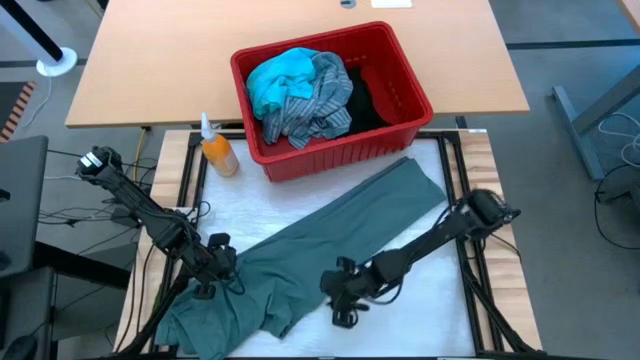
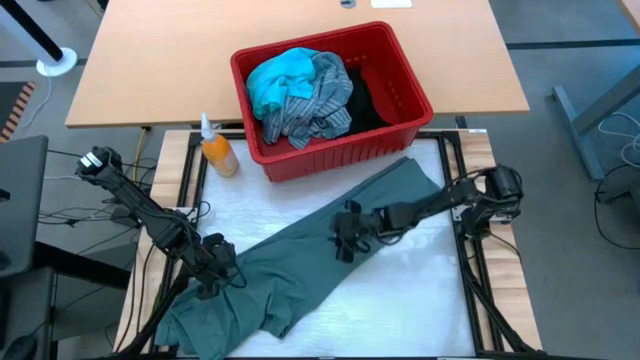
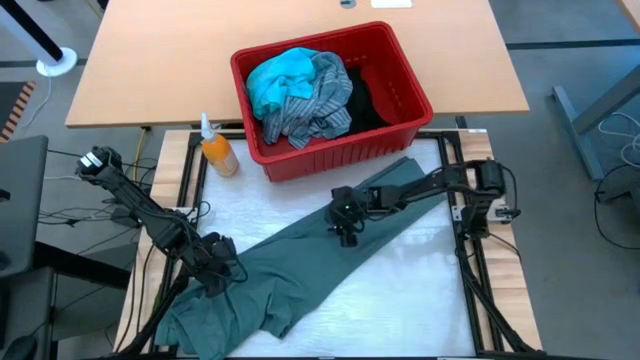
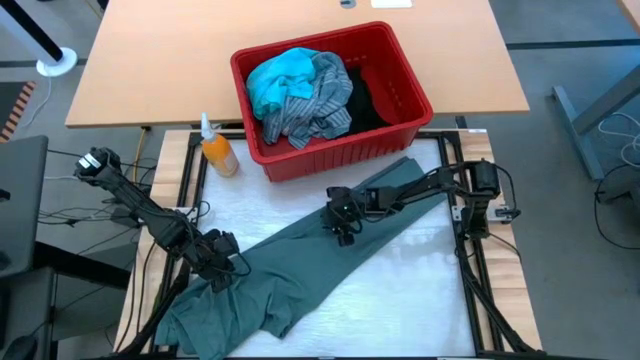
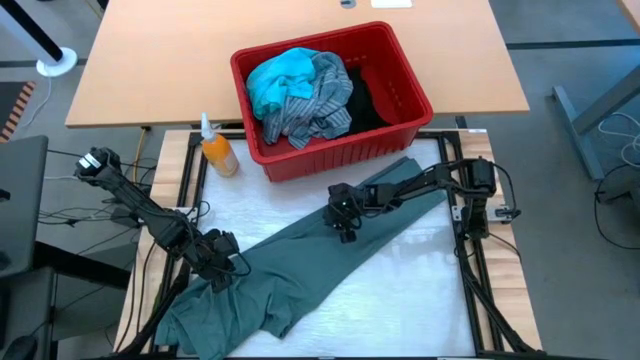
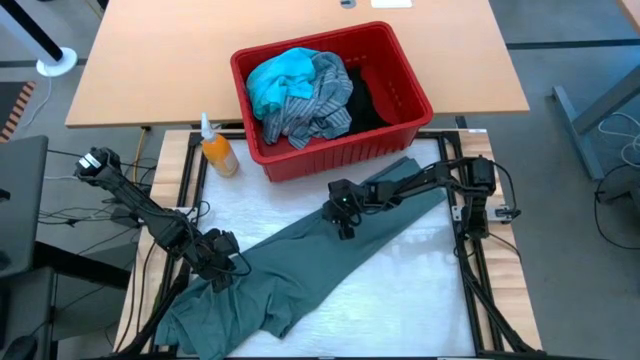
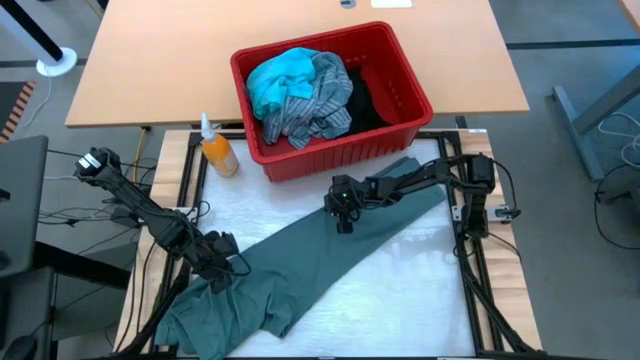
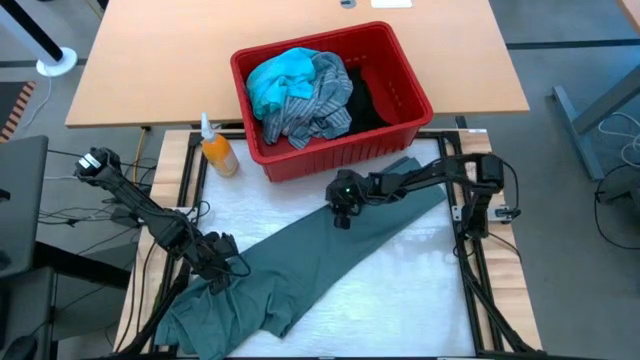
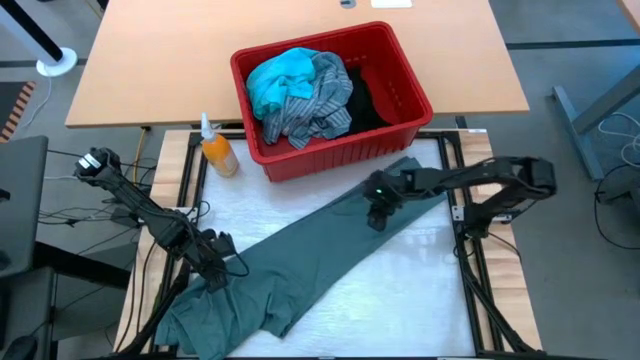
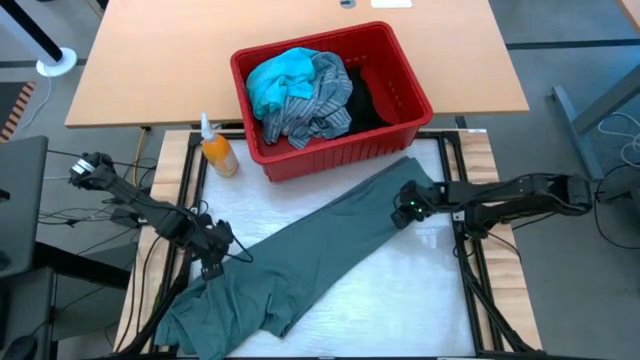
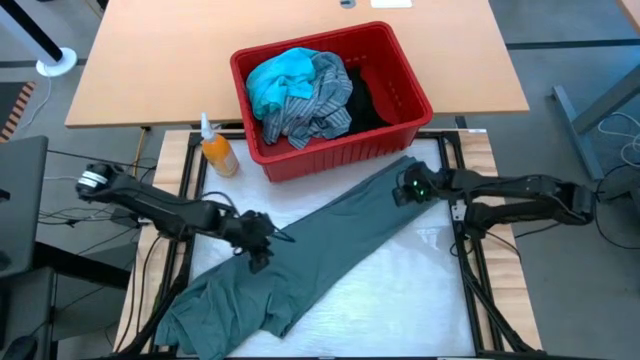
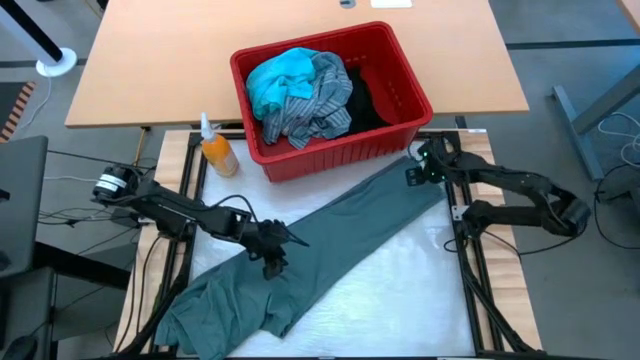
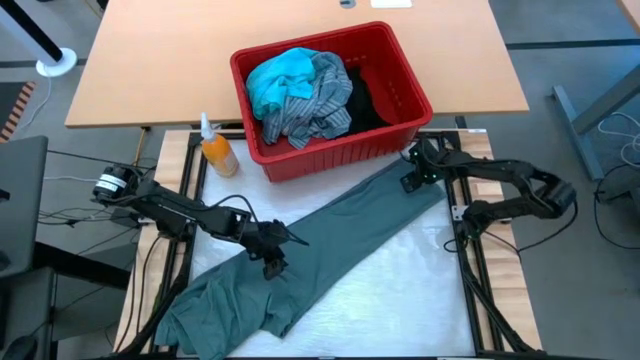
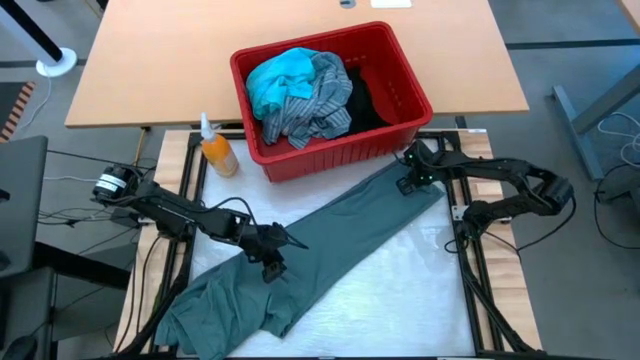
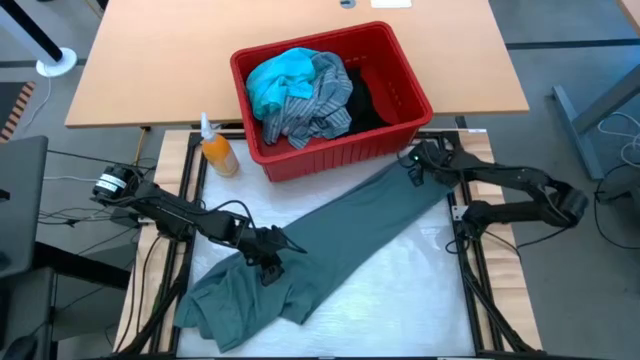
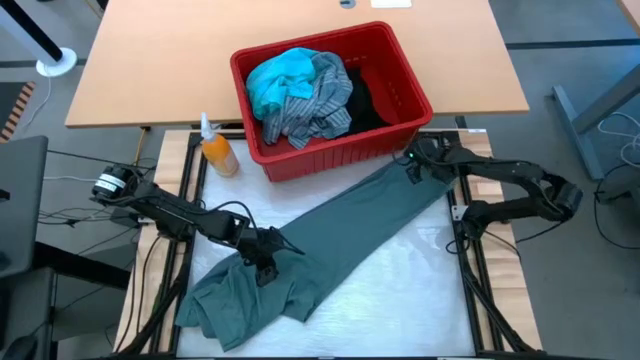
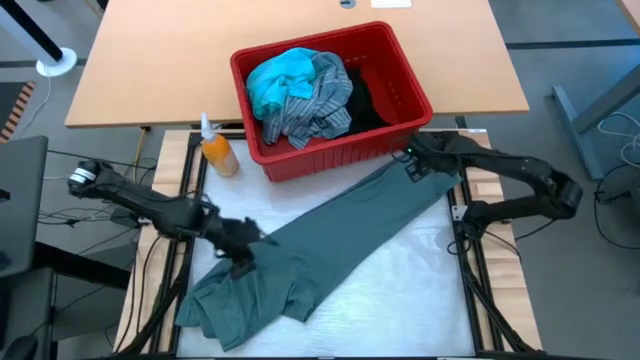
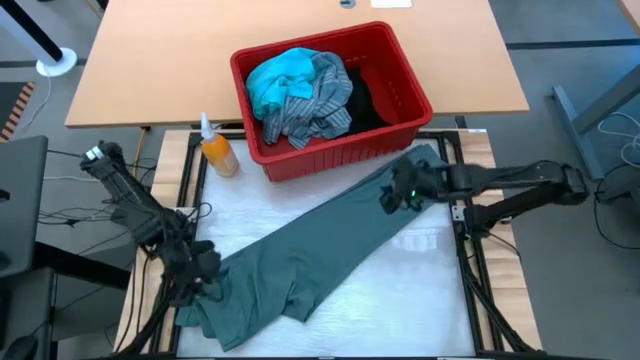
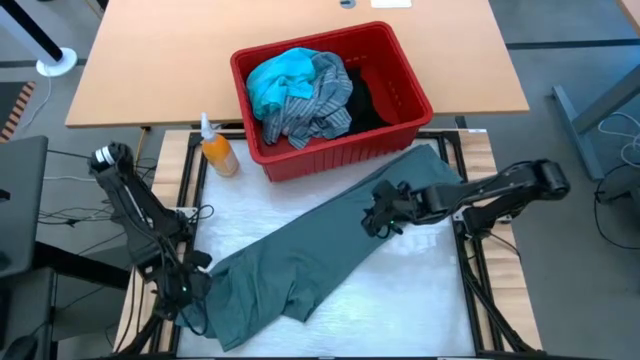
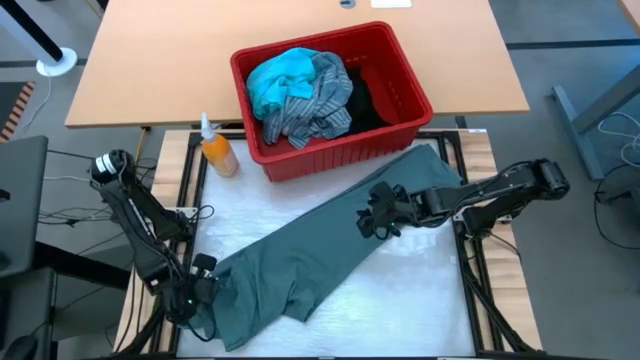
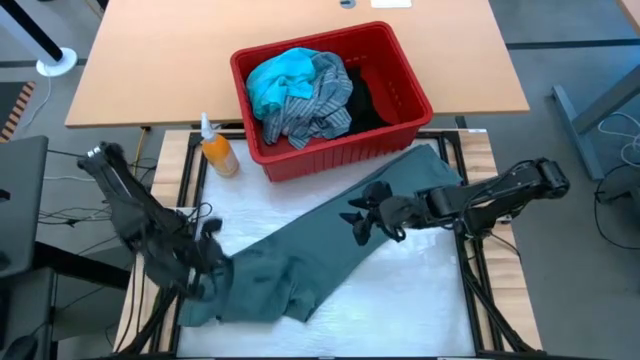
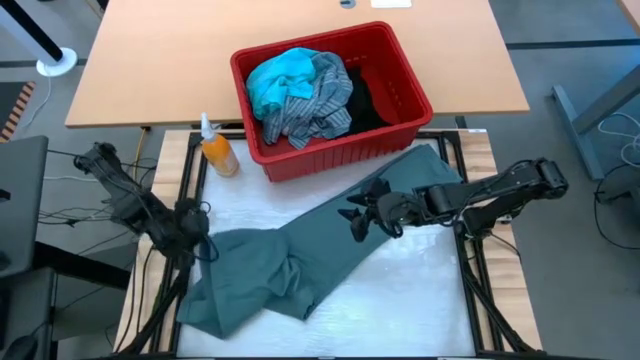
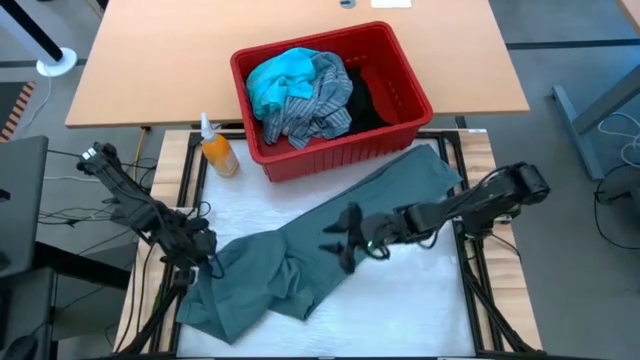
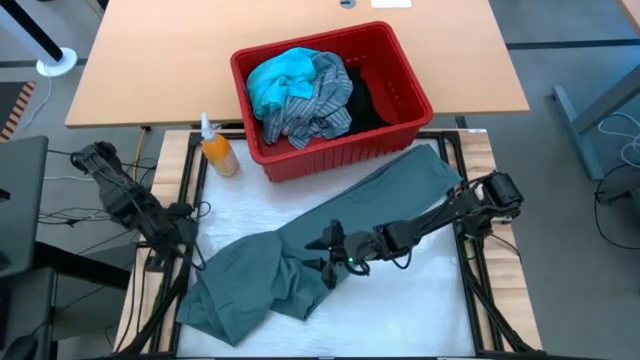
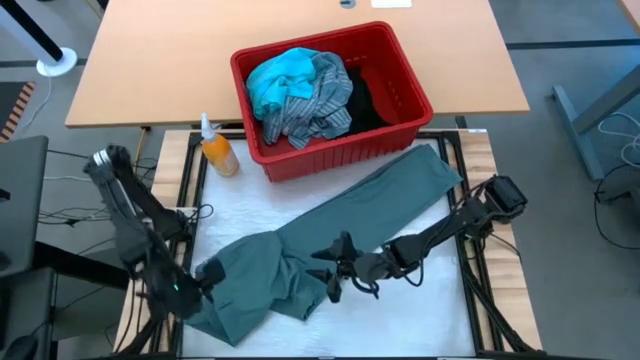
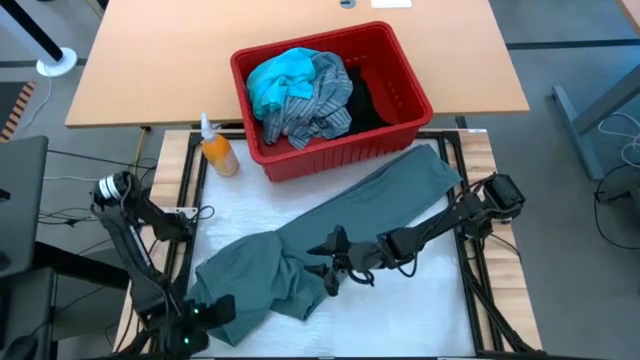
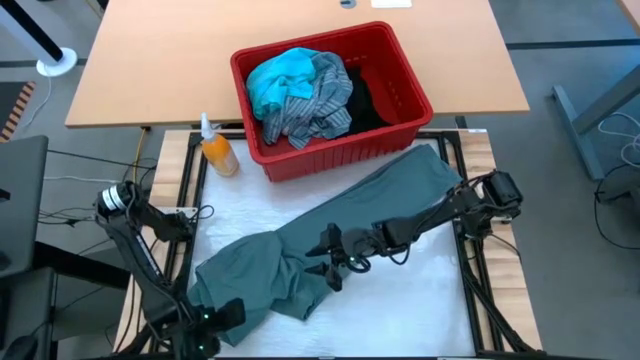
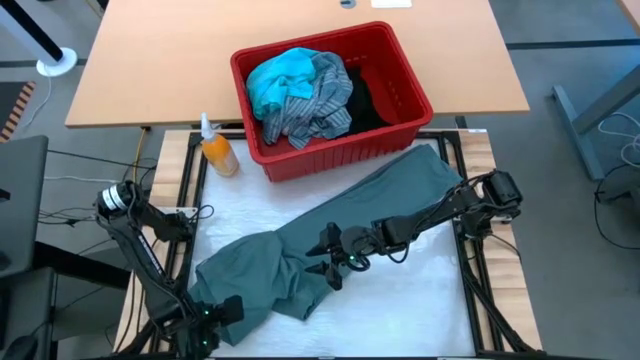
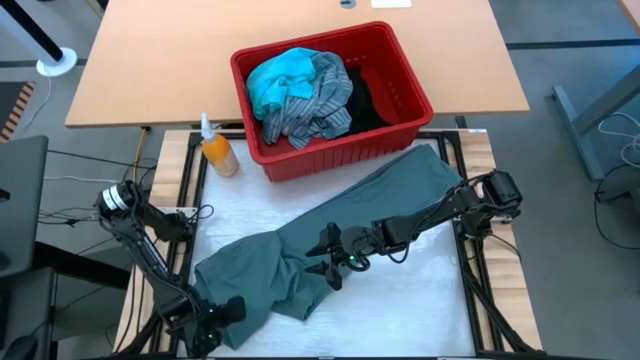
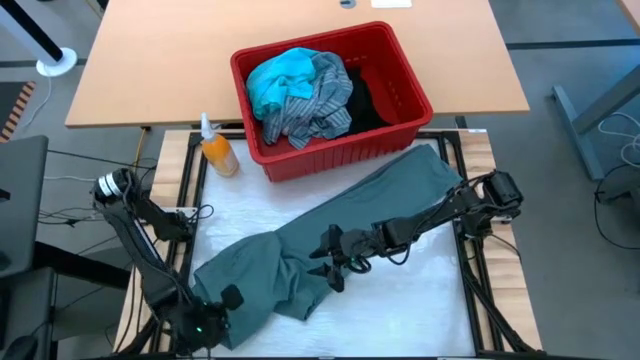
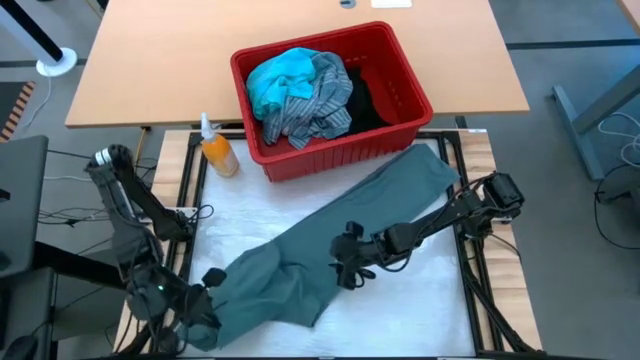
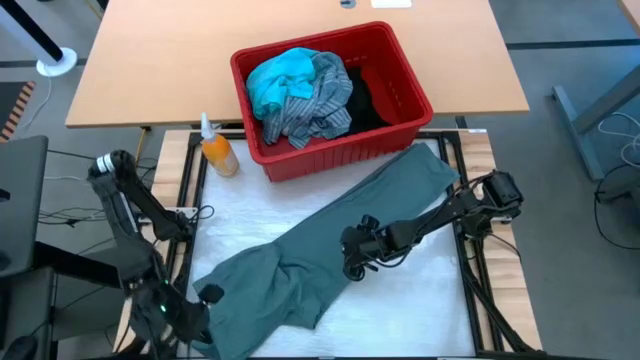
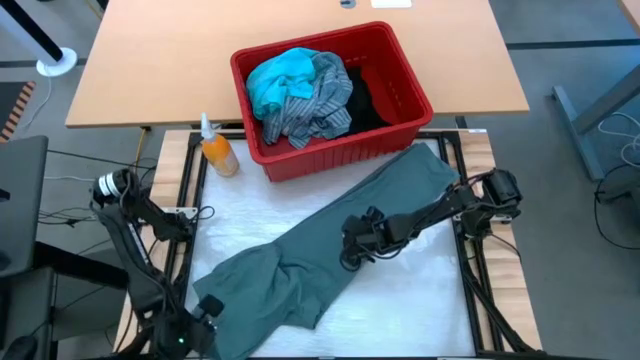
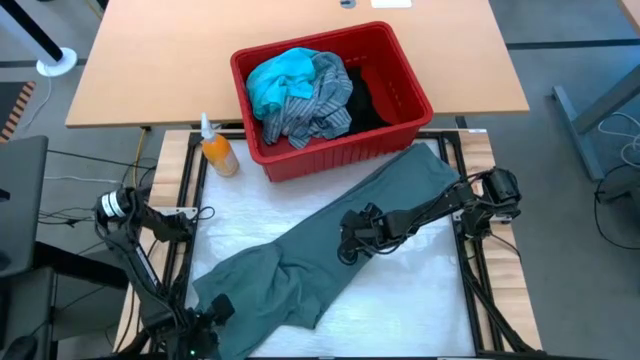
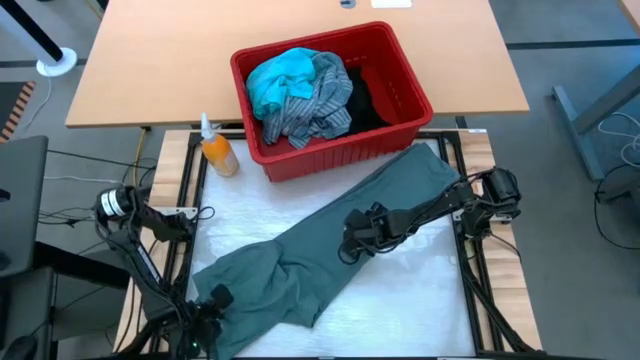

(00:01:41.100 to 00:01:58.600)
Task: Fold Laundry from Bin
Fold the dark blue pants

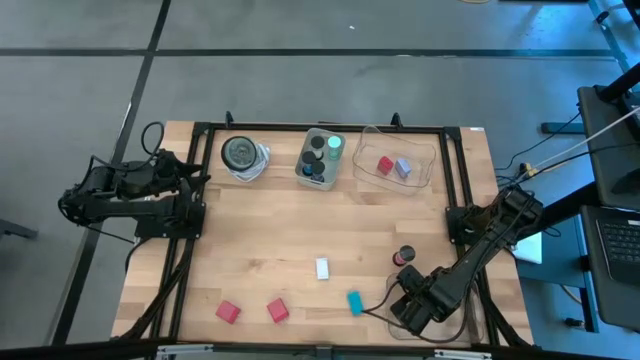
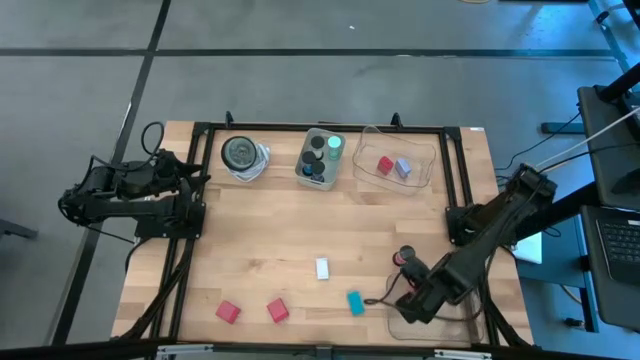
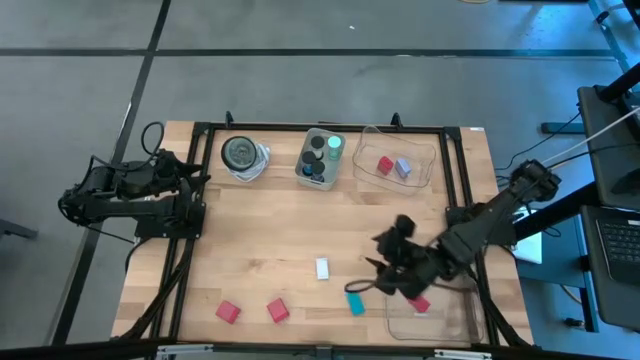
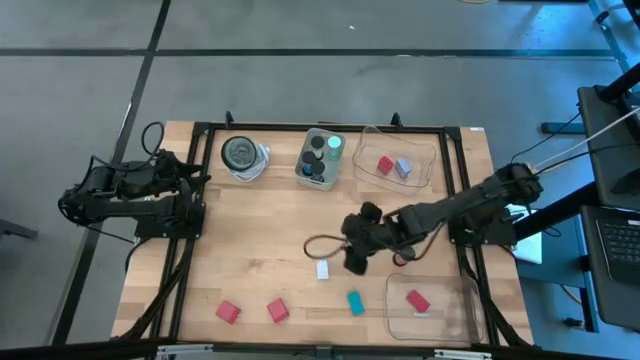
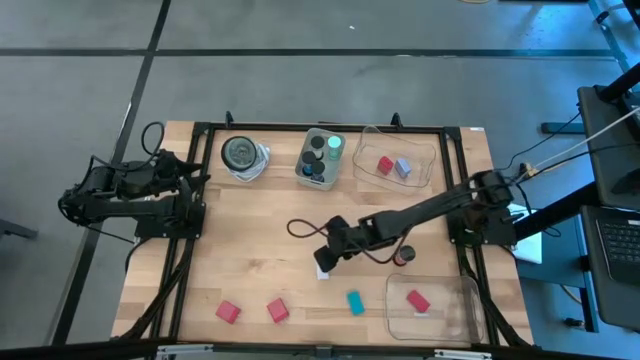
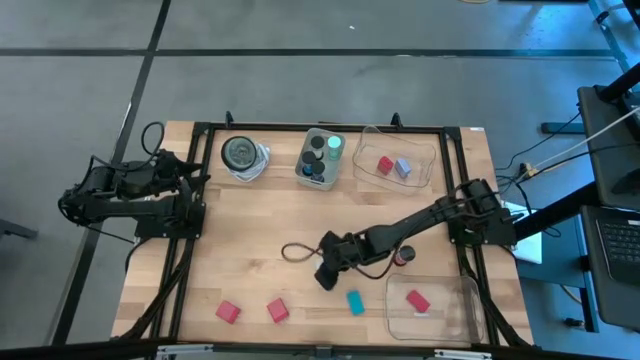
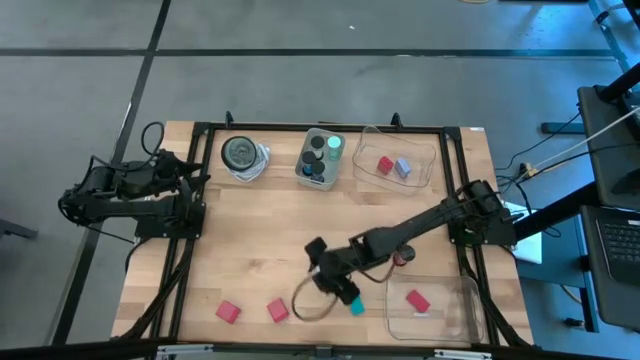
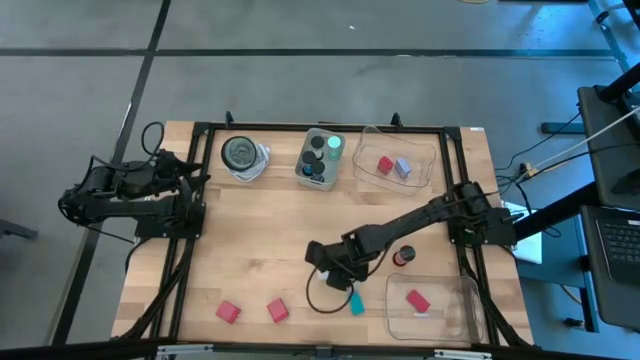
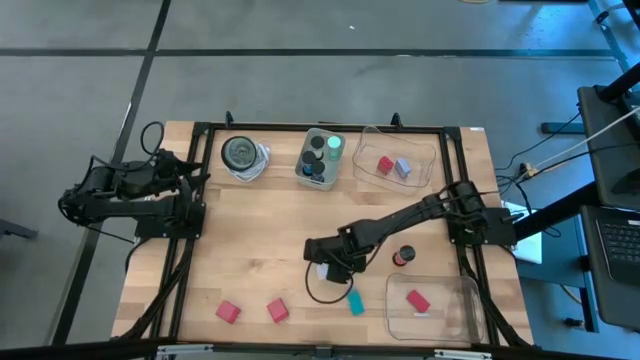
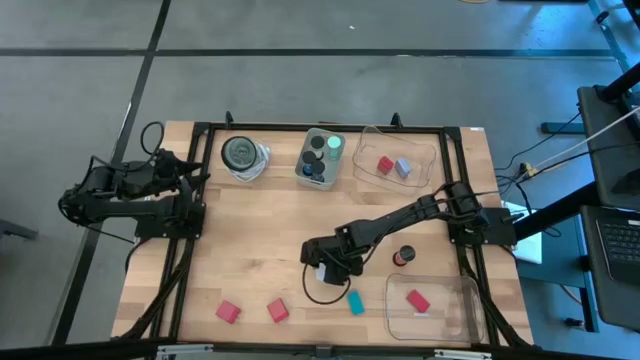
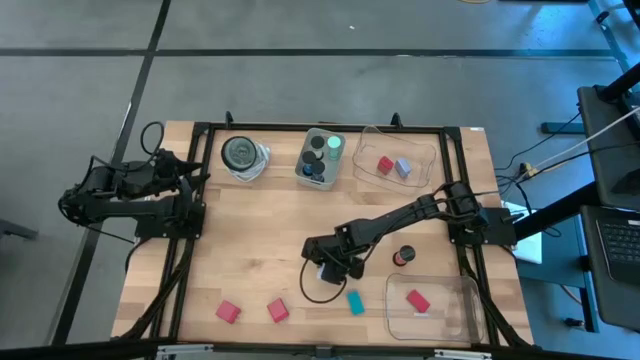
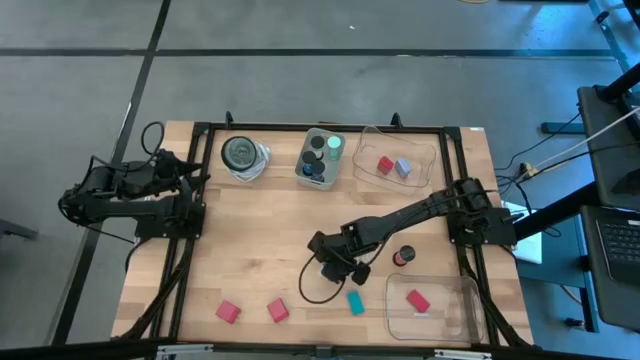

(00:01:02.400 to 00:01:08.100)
Task: Pick & Place Office items
Put the white digital timer into the bottom transparent bin
